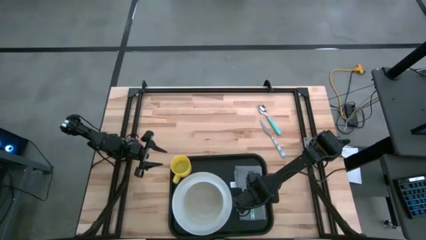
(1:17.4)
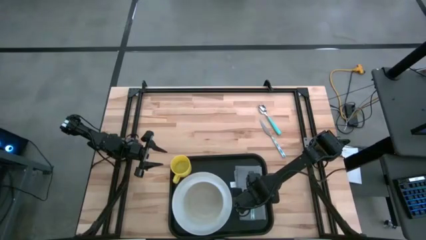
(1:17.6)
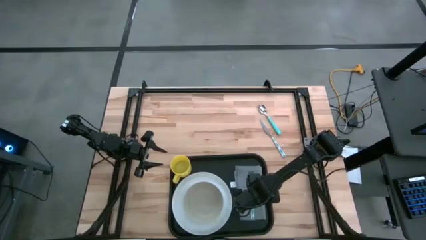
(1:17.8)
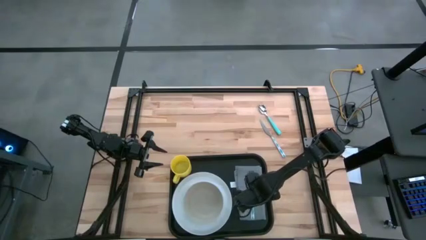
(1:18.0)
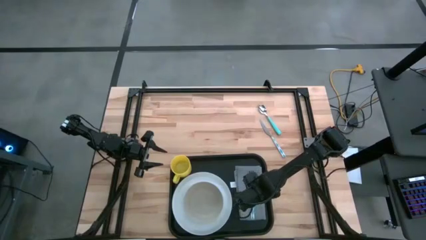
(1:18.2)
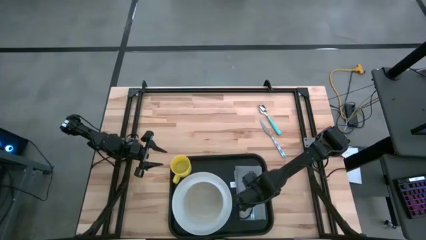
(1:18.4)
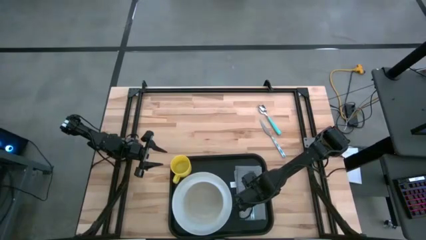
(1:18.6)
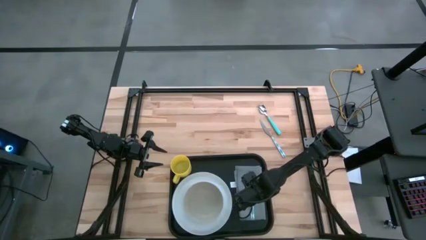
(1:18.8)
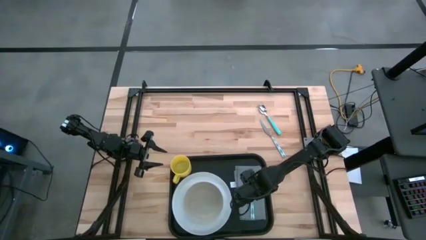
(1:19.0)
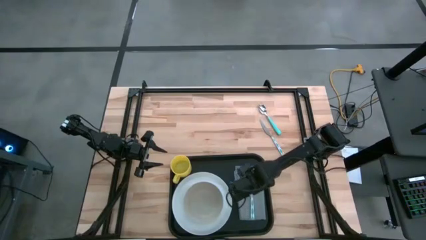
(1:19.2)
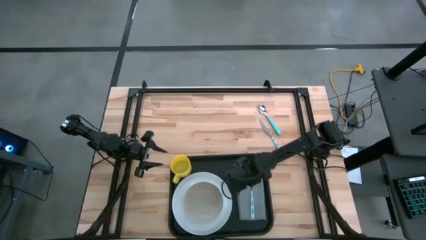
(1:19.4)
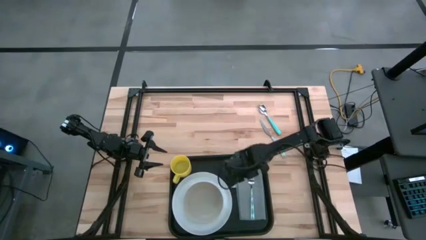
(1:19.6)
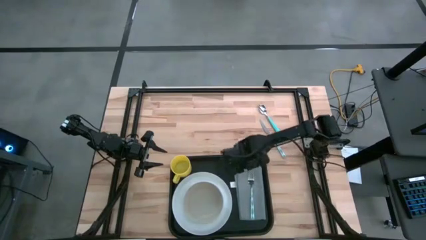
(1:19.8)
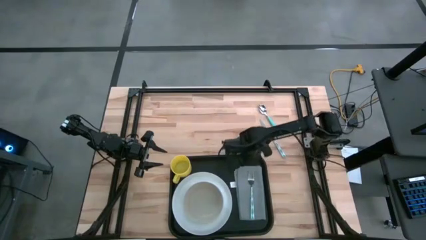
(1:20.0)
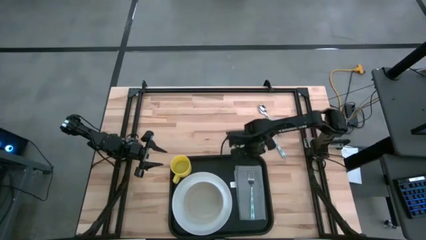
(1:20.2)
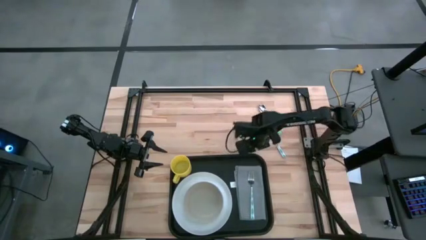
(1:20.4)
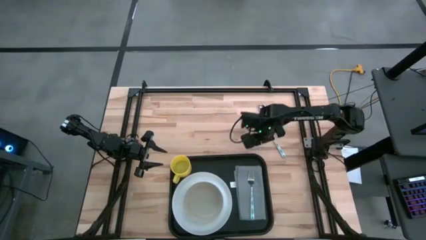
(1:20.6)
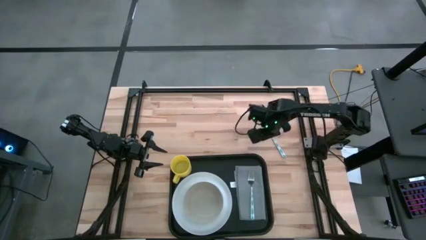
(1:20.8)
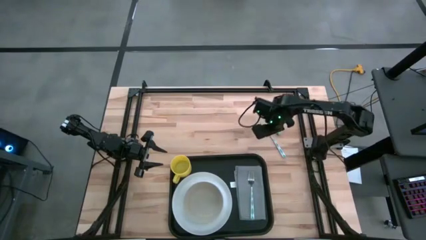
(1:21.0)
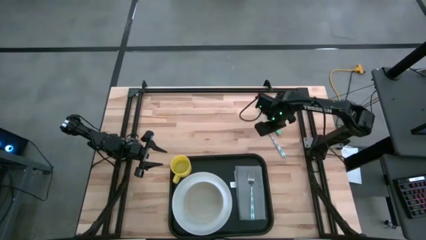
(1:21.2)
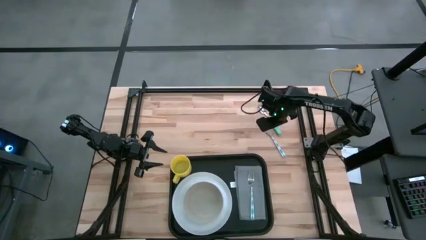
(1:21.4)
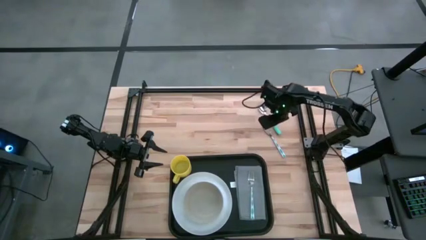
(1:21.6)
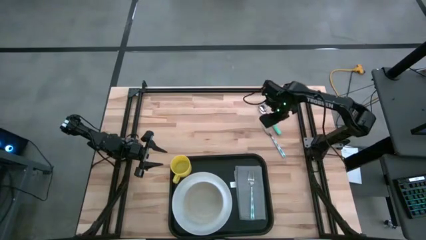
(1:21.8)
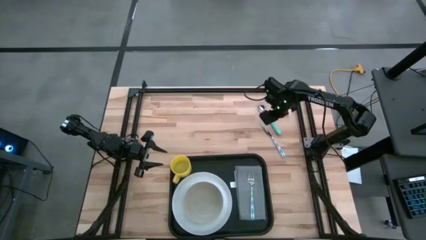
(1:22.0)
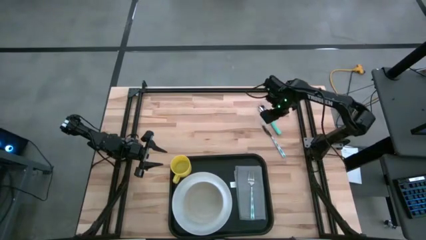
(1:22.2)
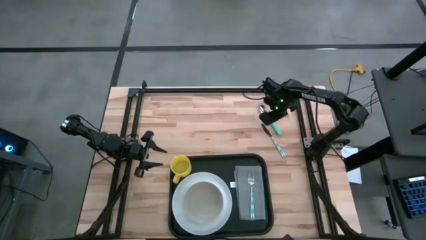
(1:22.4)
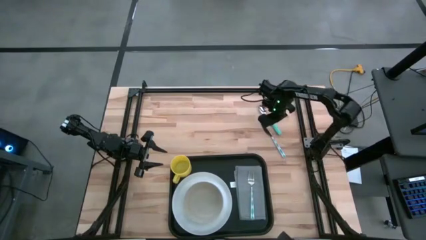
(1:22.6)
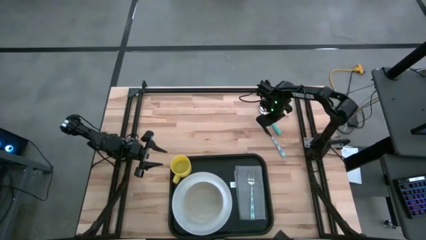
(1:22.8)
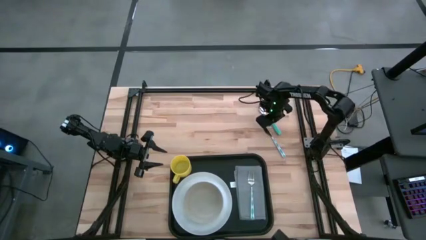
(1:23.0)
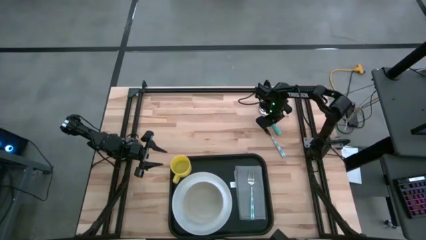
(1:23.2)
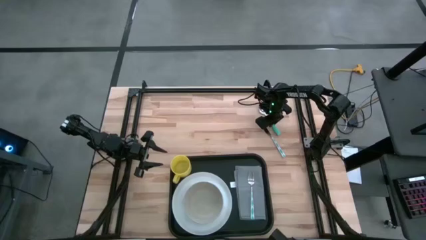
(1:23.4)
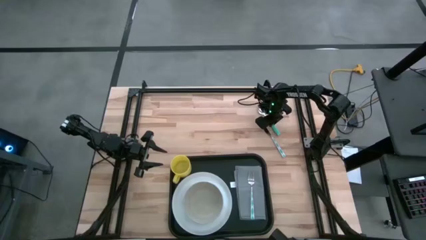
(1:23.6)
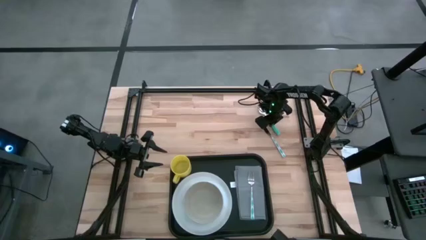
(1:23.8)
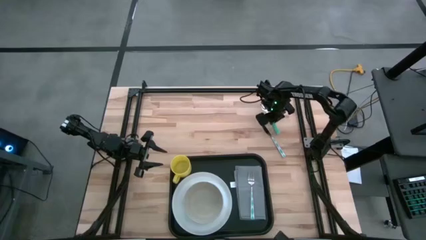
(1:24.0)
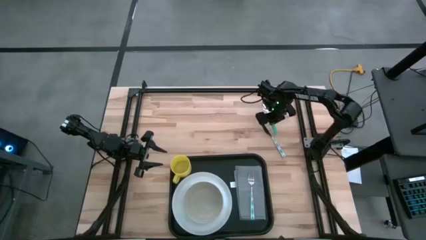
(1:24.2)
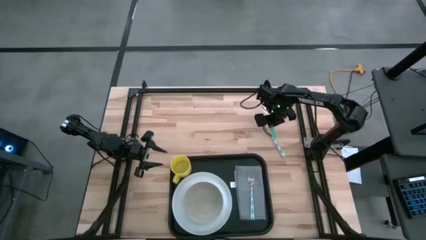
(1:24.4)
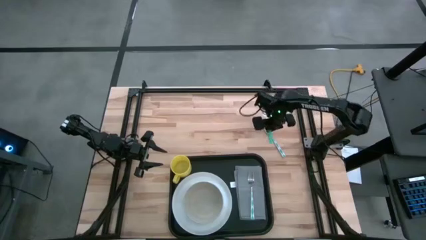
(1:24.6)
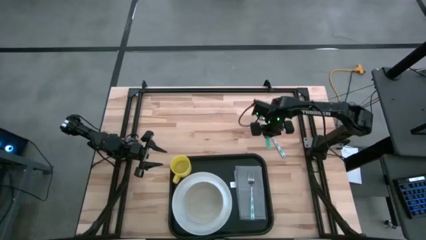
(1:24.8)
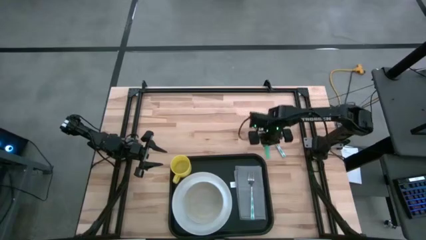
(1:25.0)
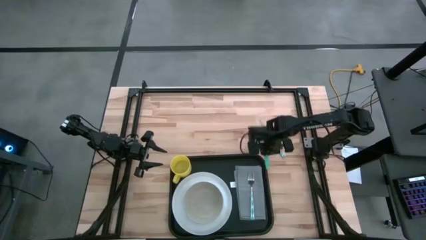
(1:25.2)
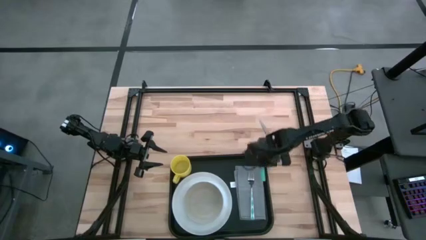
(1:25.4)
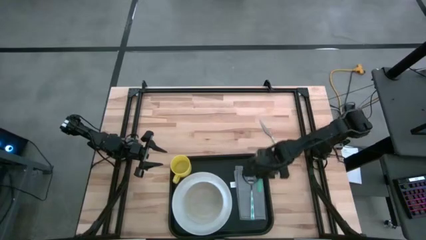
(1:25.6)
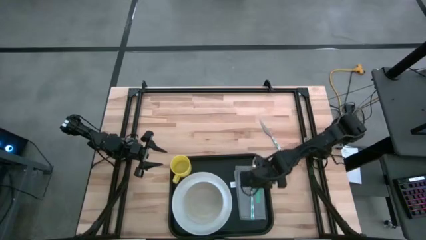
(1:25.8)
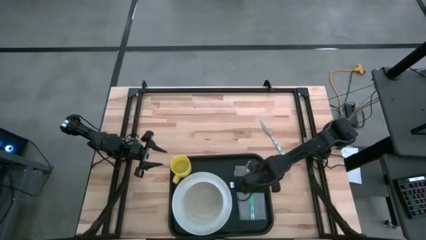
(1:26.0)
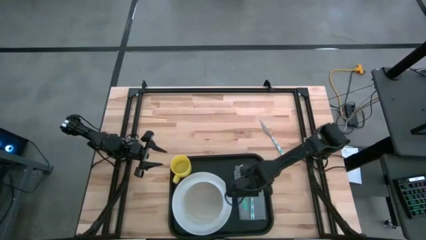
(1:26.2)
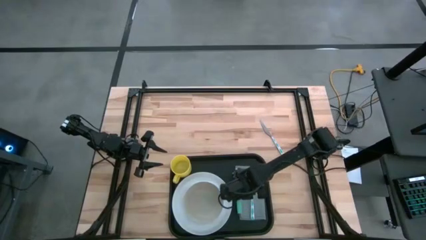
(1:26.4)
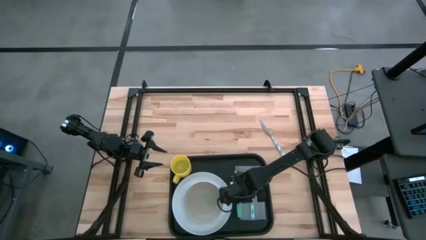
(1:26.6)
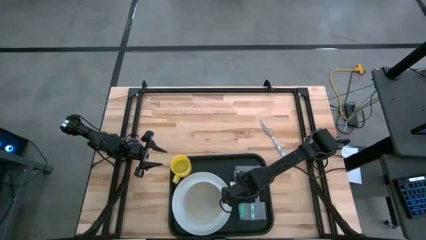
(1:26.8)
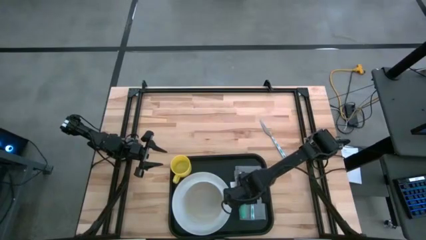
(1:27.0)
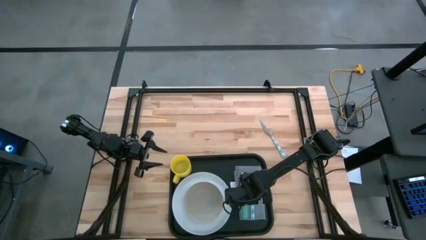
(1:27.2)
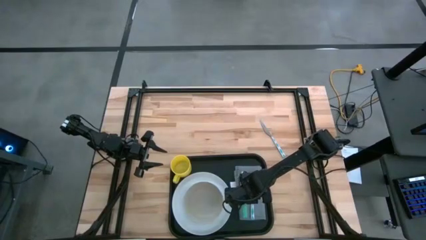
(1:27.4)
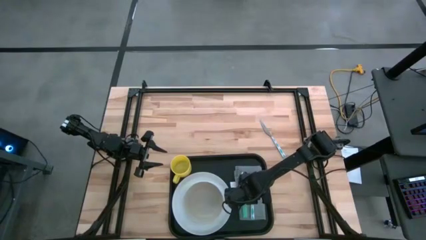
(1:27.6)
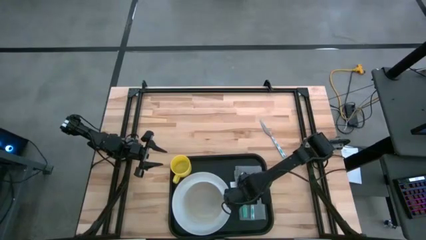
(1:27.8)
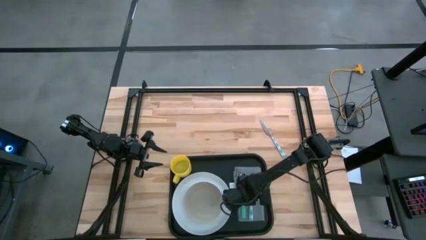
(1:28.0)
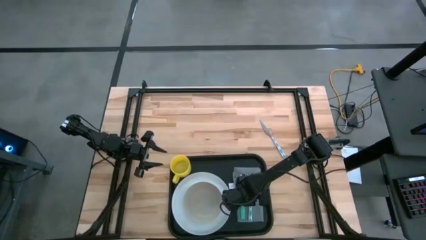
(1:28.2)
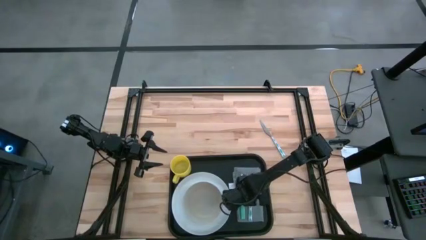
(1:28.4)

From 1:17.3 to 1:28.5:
Task: Set up tray
Put the green spoon to the left of the white fork on the gray napkin on the black serving tray

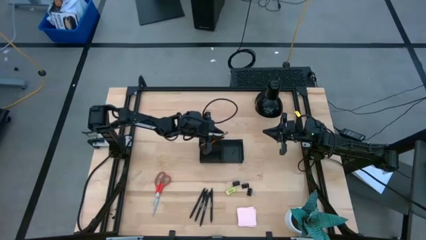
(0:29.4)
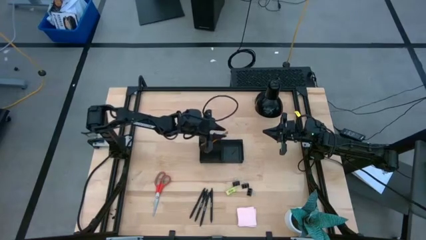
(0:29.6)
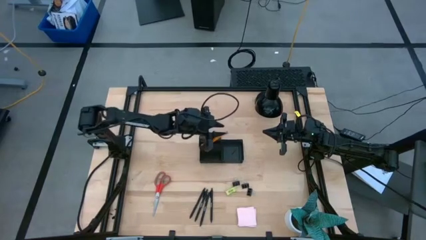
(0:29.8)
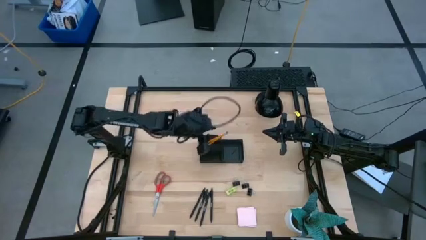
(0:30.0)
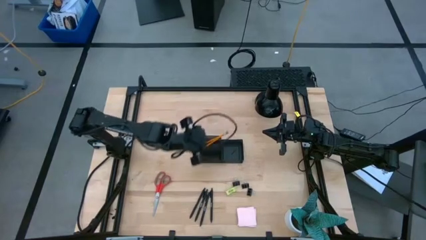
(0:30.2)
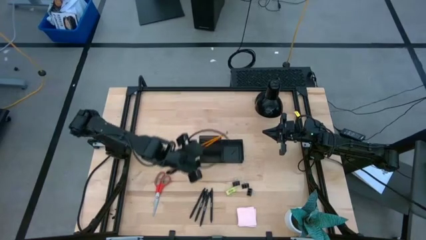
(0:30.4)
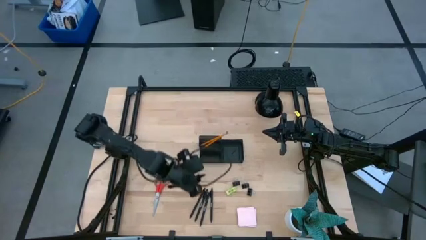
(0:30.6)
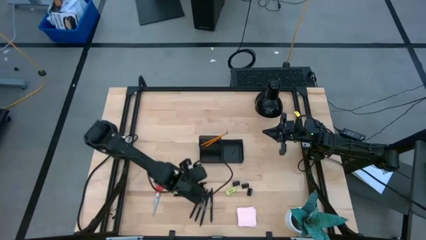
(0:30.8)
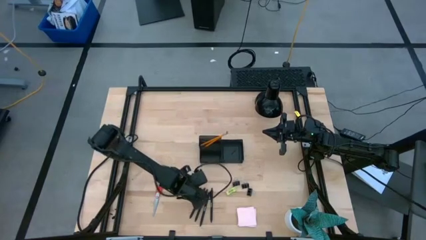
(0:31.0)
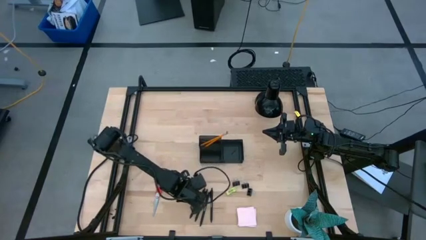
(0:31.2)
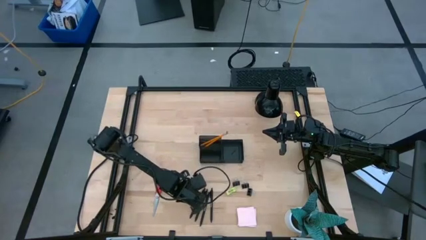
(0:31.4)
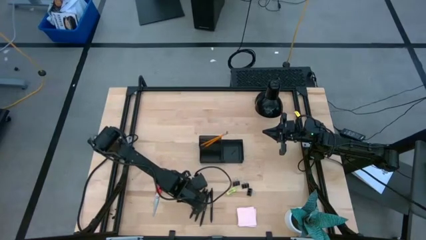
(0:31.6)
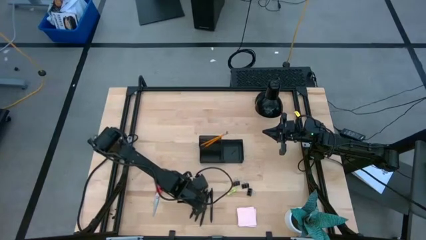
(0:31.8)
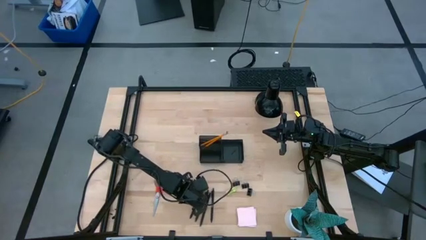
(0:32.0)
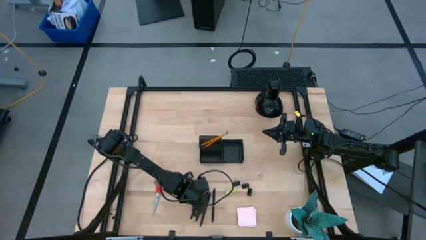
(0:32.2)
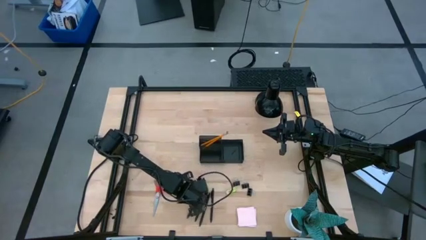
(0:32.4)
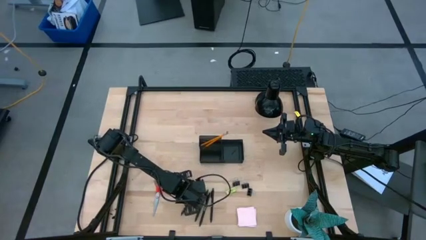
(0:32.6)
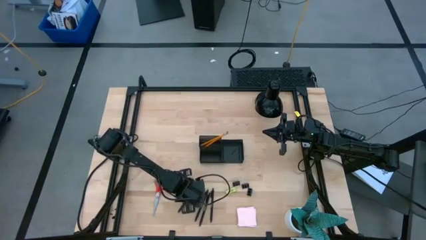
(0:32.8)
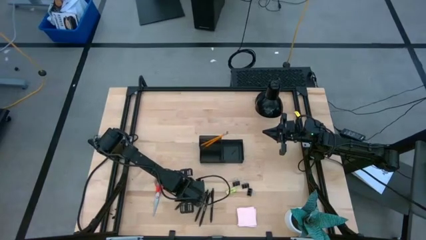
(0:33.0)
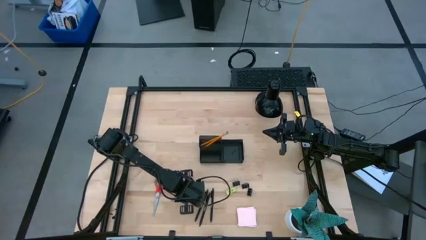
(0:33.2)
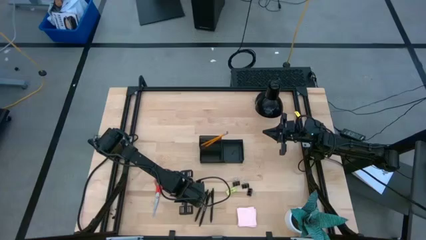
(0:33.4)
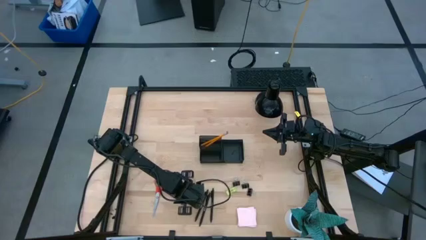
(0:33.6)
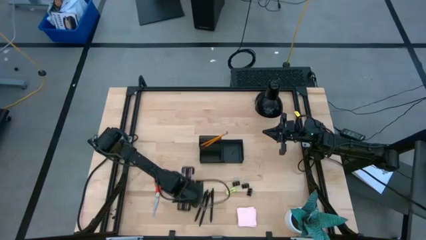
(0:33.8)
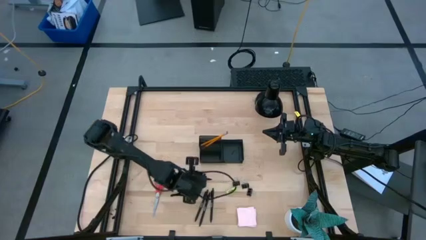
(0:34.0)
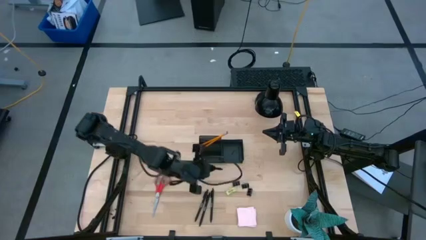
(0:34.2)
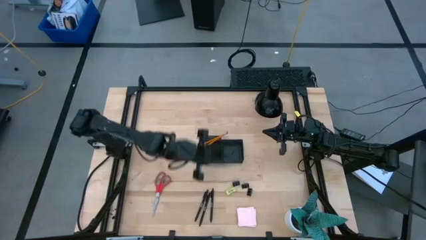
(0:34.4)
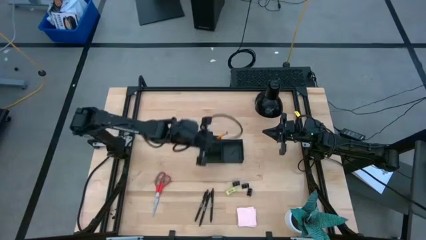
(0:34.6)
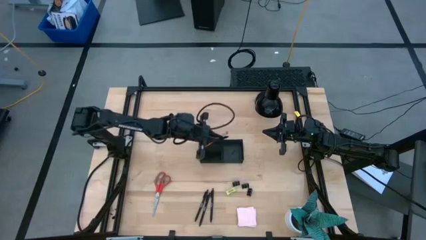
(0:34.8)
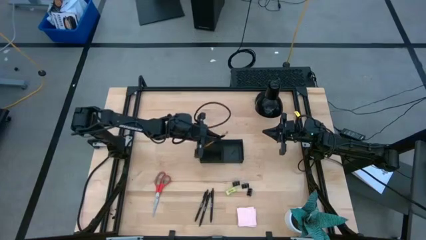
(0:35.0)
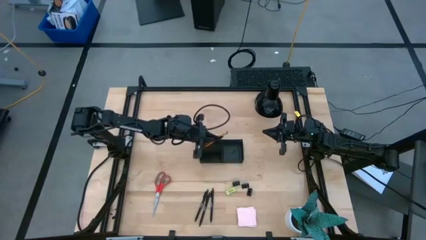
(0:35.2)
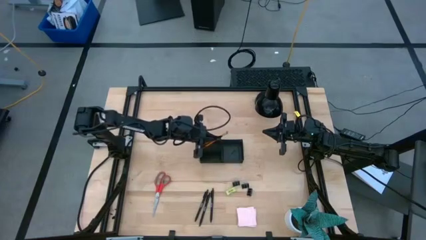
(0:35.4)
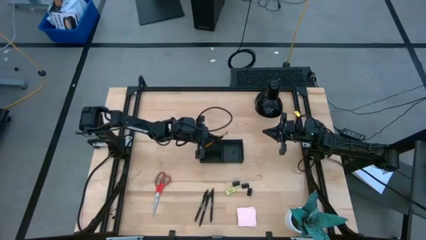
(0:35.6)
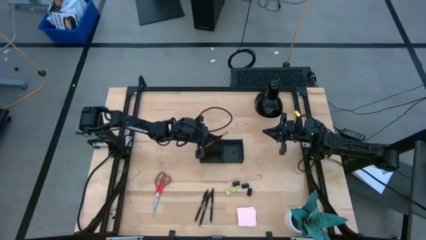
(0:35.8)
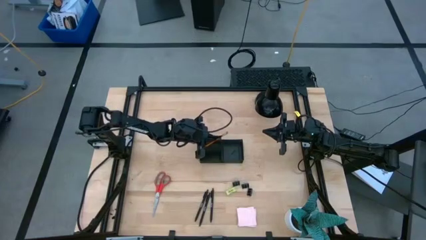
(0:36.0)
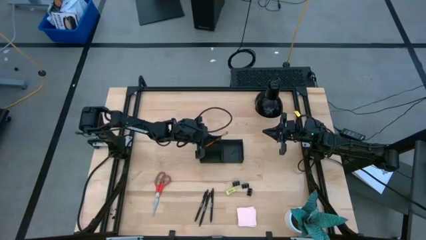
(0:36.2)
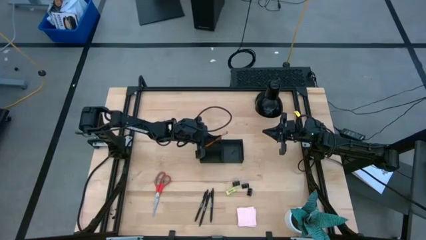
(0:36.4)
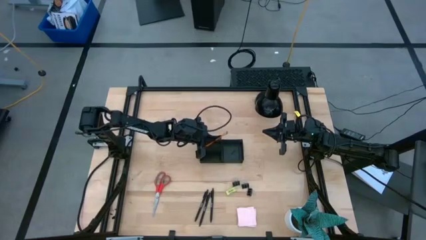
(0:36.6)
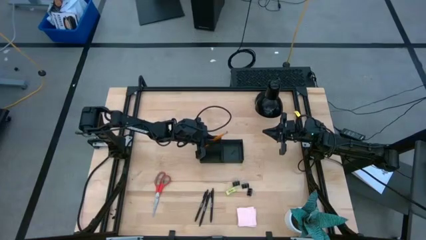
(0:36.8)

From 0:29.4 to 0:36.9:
Task: Pick and place office supplies into organizer
Put the black pen into the black desk organizer
